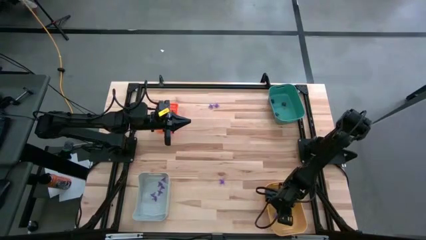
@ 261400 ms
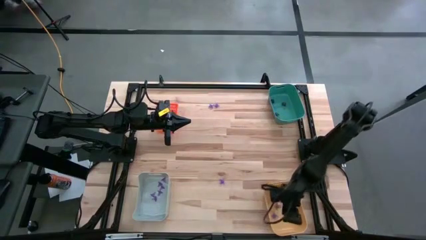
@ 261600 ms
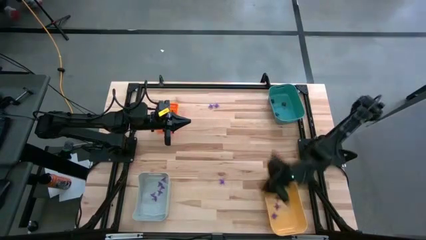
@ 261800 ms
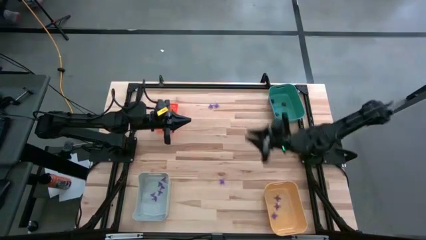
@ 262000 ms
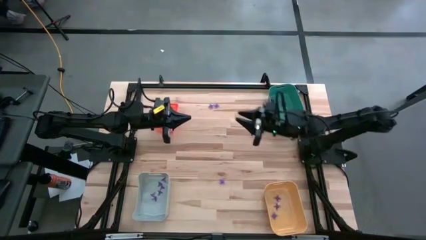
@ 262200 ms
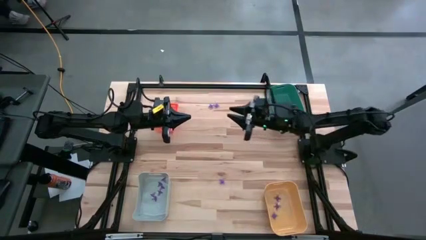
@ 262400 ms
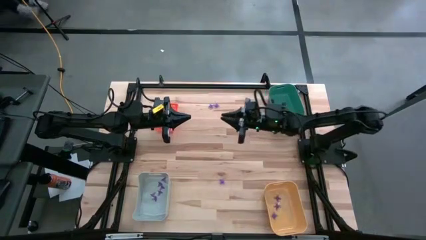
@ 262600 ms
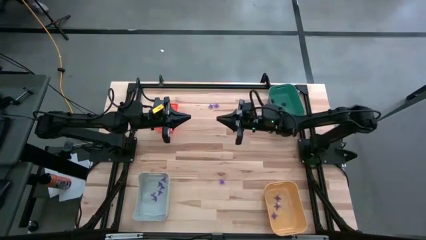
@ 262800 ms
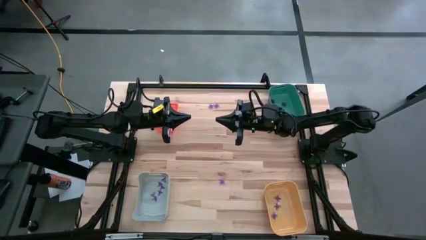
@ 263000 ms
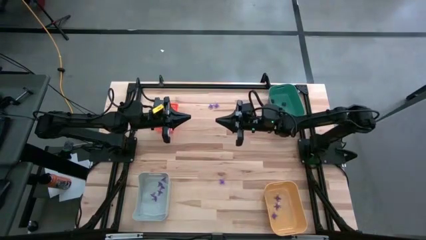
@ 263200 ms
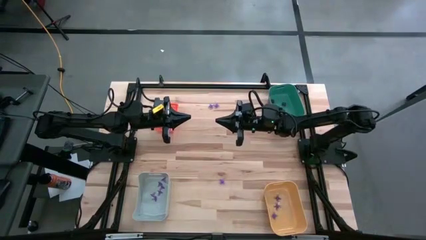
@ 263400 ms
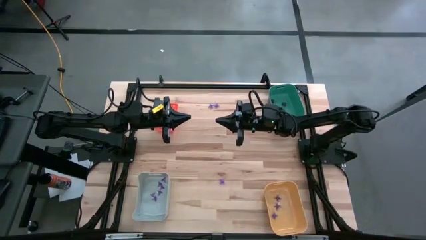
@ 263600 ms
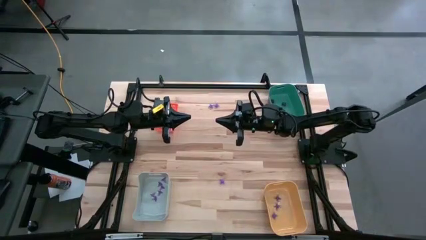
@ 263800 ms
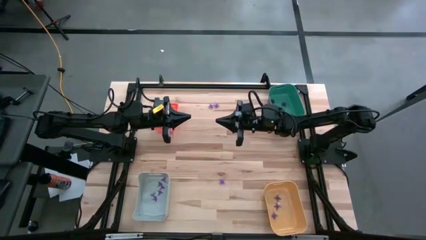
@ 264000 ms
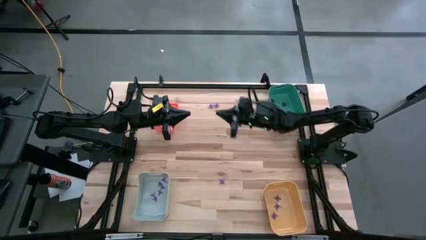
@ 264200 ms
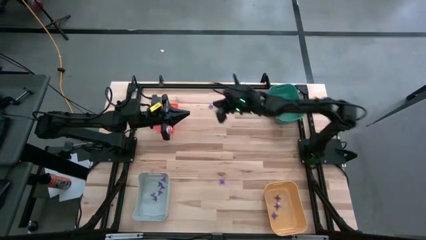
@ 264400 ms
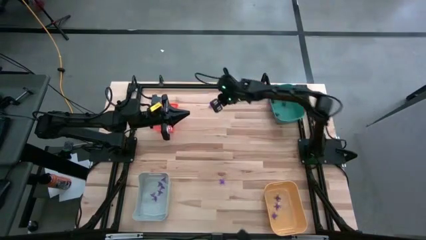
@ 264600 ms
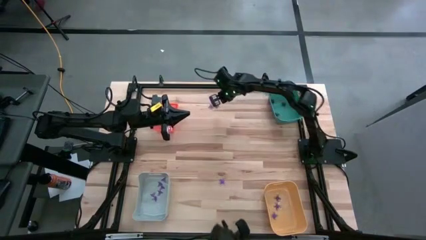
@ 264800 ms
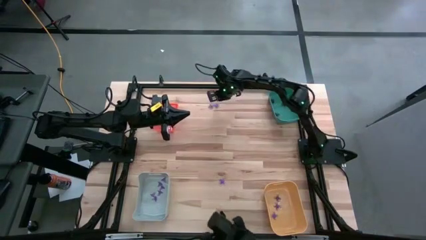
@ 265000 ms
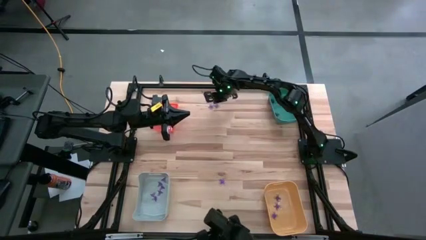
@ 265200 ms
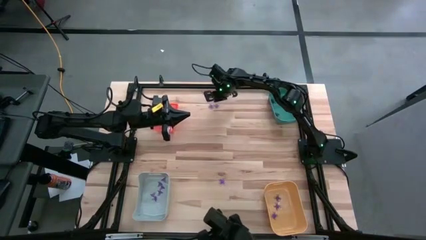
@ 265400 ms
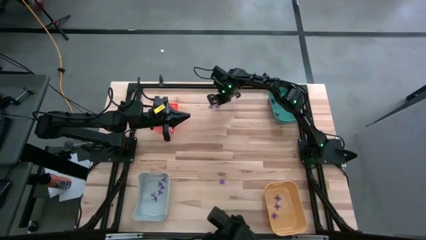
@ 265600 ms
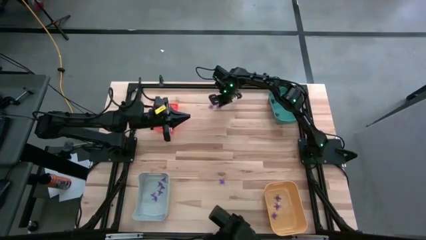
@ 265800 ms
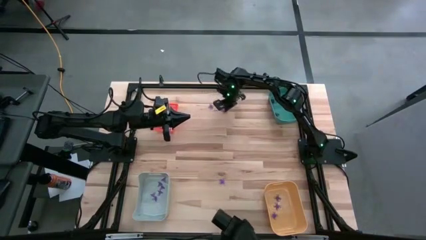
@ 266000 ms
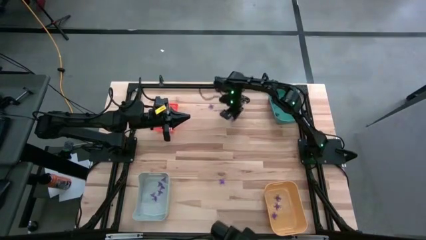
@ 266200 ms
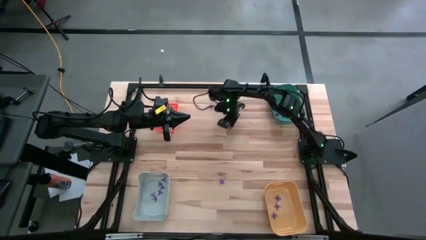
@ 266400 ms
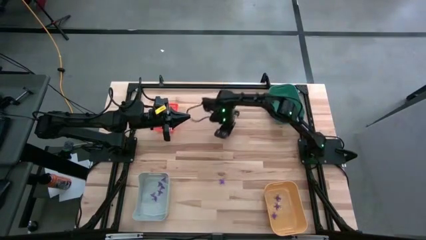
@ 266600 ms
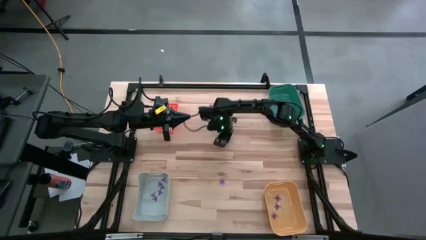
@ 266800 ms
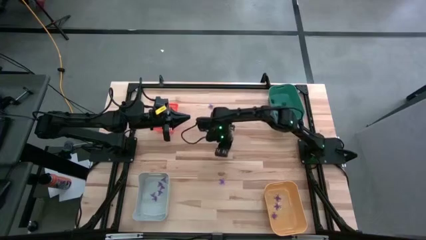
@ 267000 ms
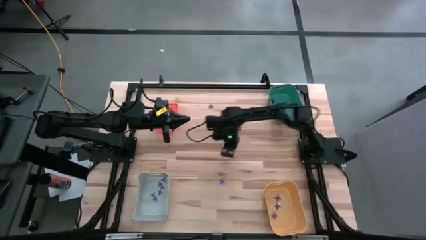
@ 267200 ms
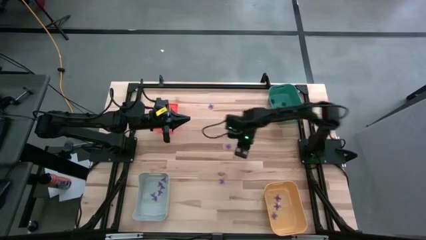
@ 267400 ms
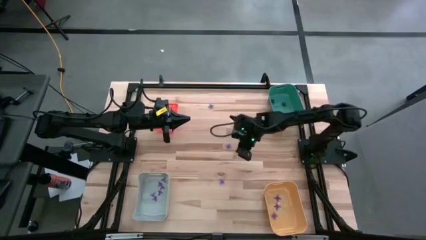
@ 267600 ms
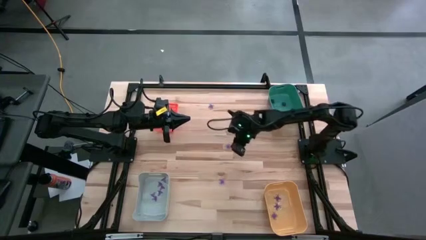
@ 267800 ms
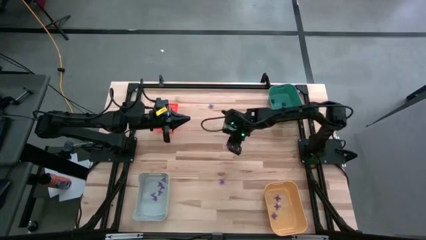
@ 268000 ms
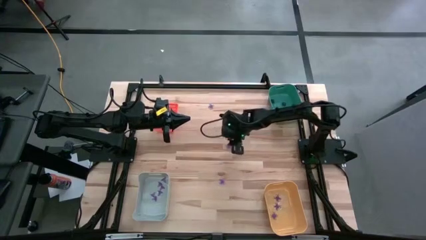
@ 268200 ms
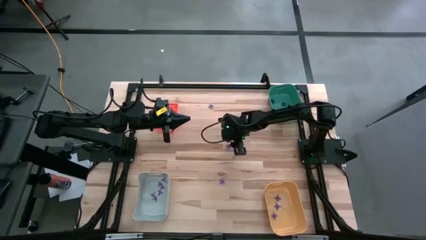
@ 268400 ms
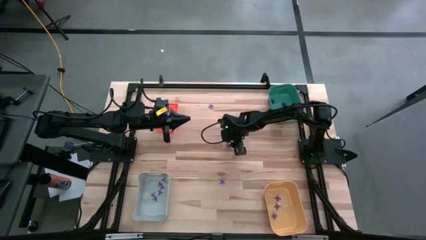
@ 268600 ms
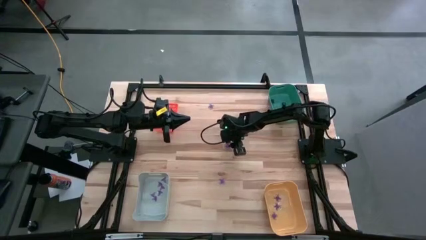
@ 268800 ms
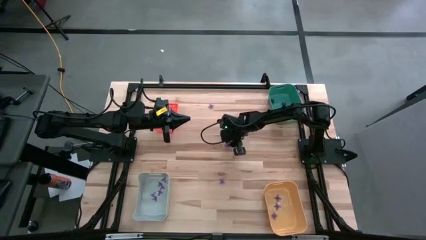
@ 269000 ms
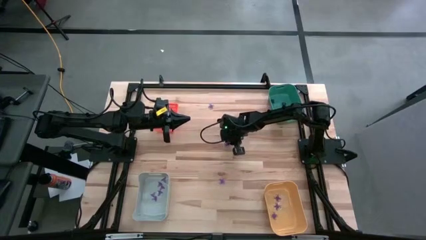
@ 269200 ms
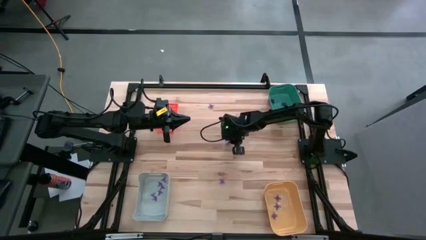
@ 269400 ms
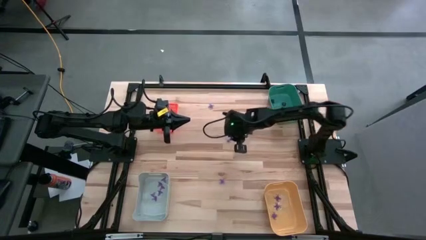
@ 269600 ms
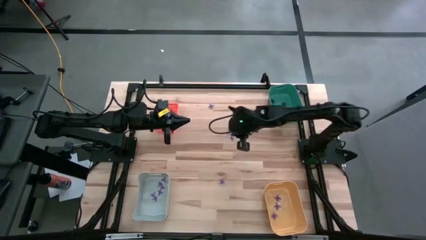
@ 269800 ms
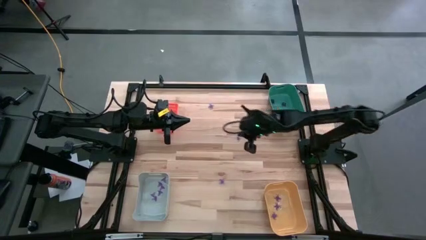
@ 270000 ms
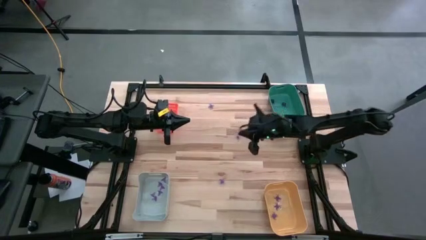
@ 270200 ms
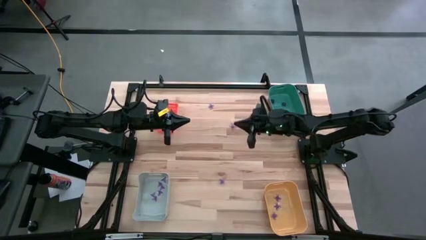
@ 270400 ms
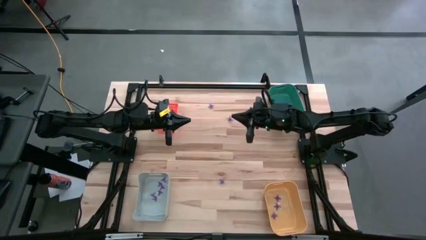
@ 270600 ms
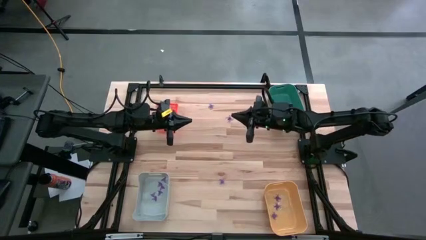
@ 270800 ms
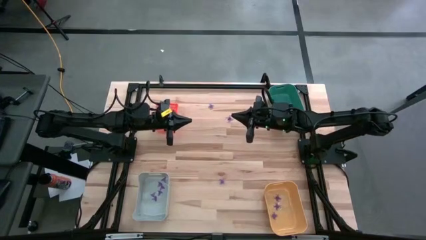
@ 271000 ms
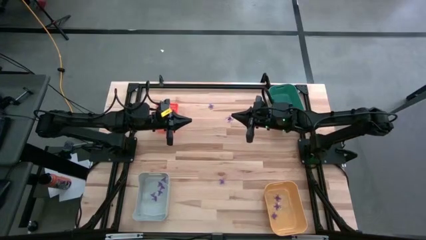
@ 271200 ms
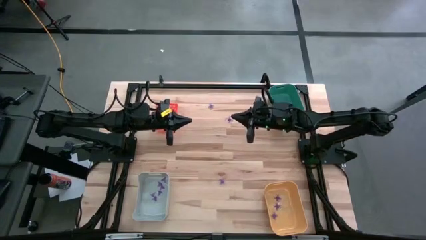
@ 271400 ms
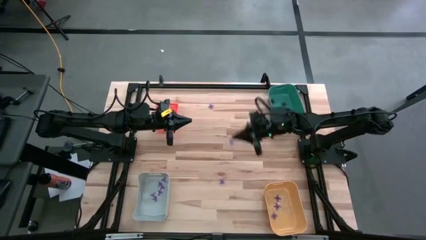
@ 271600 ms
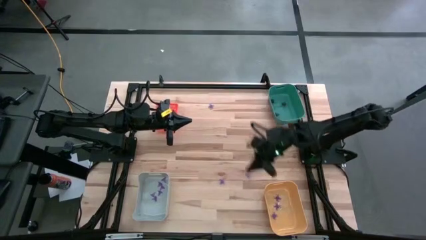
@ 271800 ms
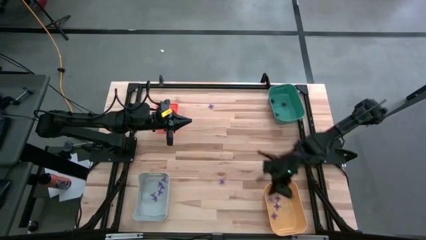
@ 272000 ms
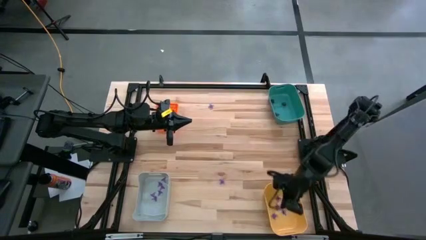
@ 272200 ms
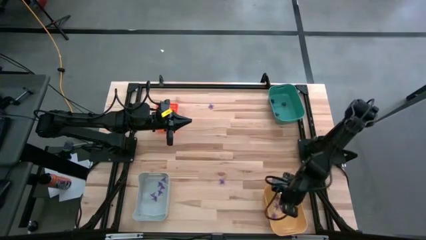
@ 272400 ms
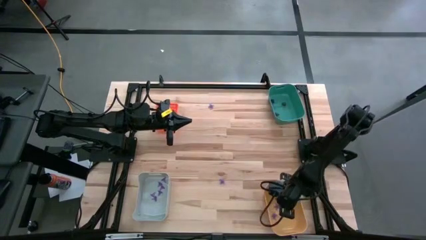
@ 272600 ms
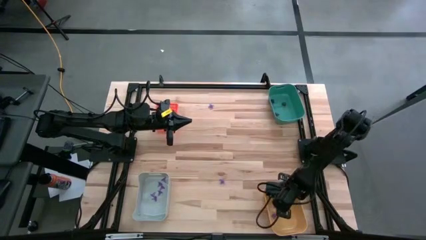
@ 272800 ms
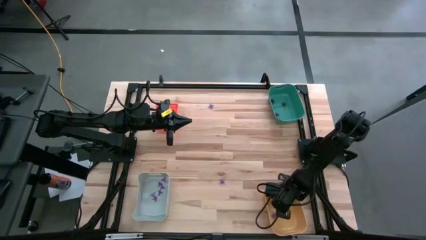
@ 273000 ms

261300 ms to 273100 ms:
Task: Sort Halloween decoration
Put the violet spider toy into the yellow bin
